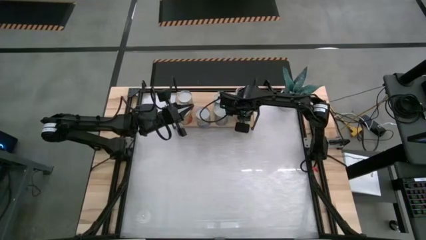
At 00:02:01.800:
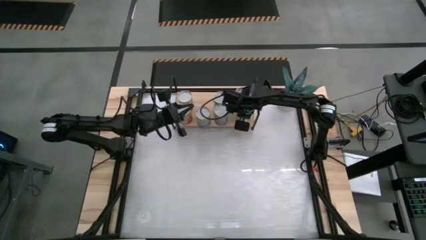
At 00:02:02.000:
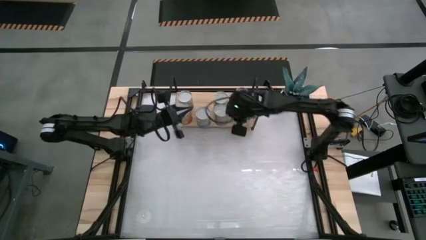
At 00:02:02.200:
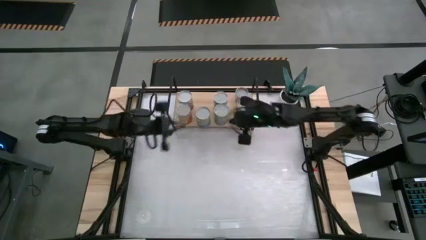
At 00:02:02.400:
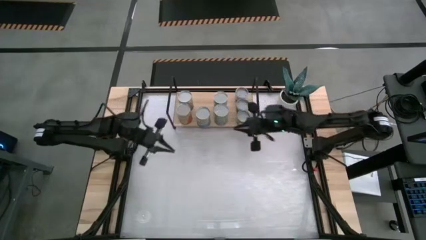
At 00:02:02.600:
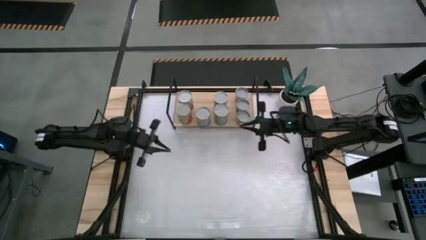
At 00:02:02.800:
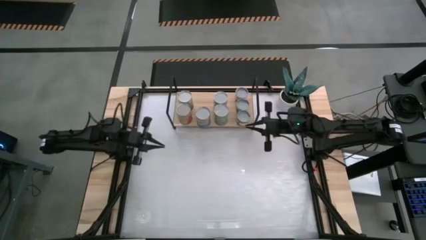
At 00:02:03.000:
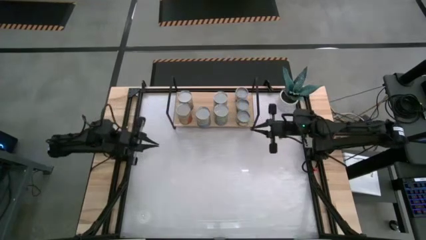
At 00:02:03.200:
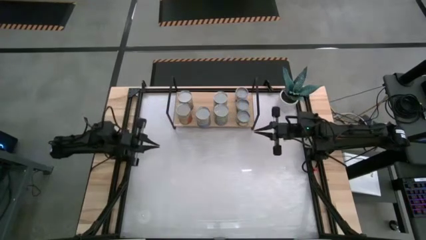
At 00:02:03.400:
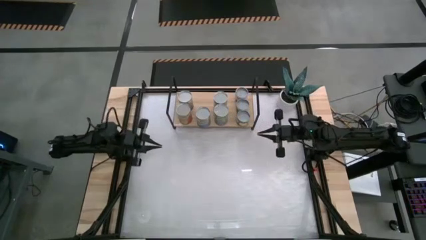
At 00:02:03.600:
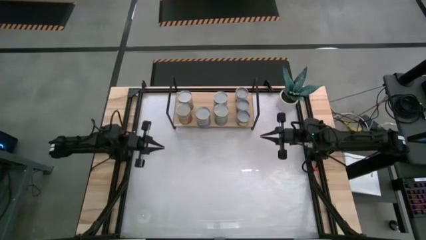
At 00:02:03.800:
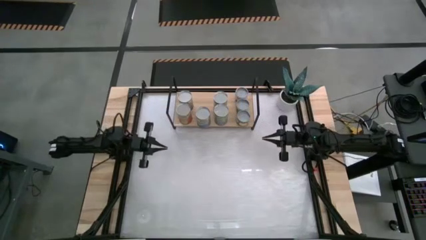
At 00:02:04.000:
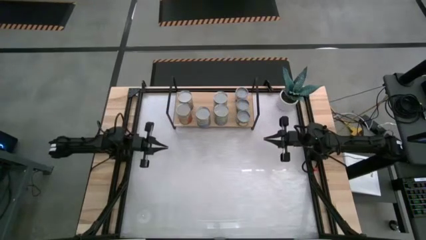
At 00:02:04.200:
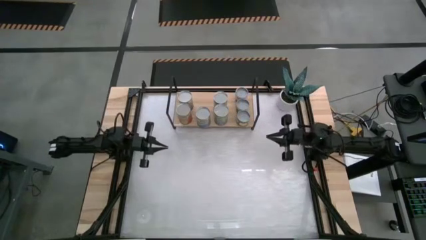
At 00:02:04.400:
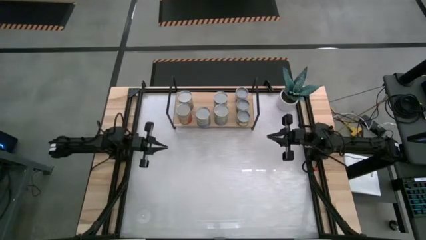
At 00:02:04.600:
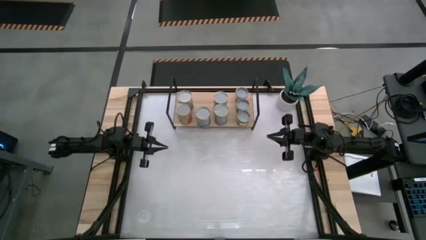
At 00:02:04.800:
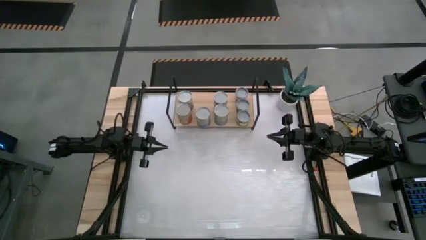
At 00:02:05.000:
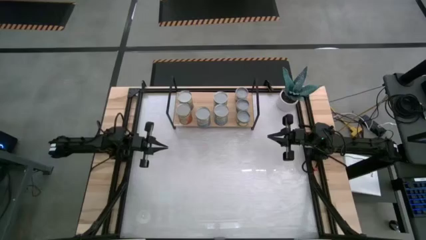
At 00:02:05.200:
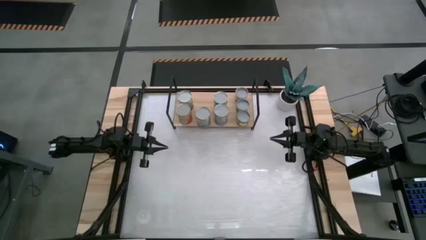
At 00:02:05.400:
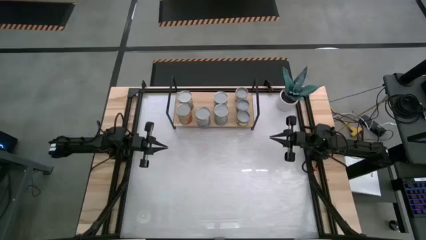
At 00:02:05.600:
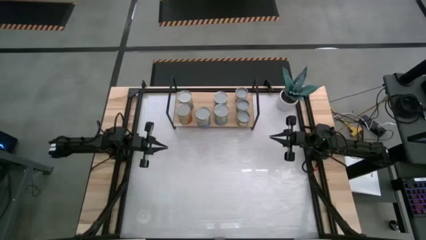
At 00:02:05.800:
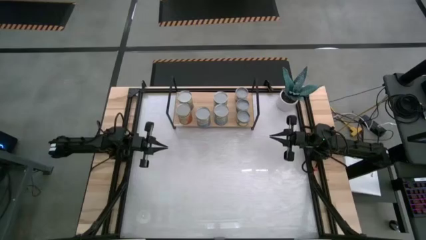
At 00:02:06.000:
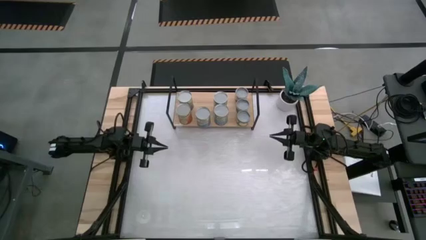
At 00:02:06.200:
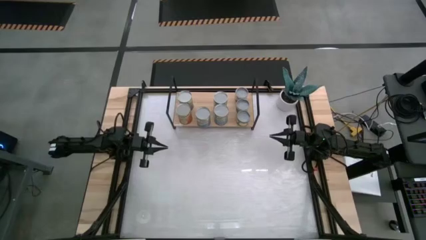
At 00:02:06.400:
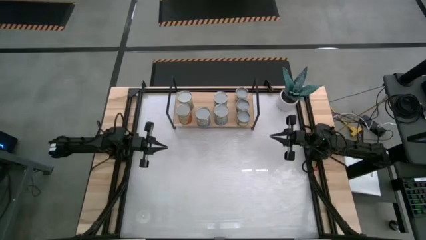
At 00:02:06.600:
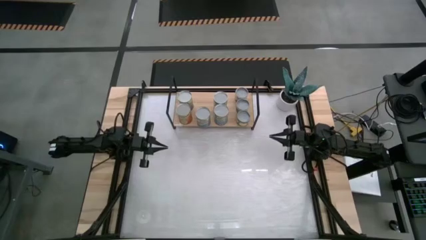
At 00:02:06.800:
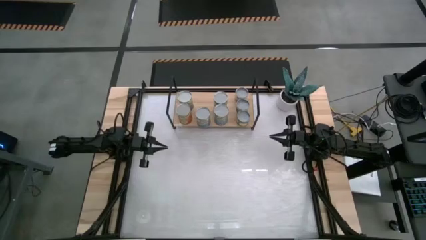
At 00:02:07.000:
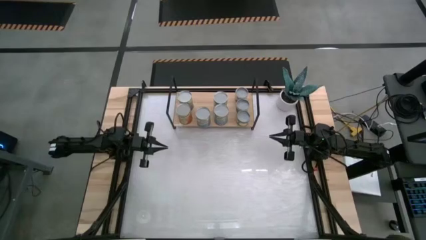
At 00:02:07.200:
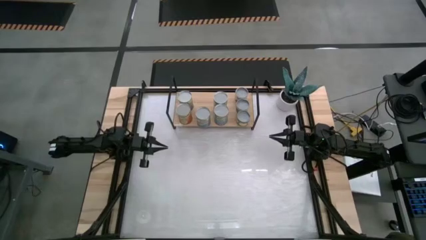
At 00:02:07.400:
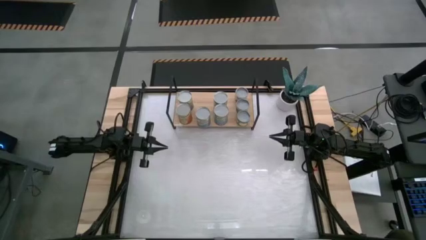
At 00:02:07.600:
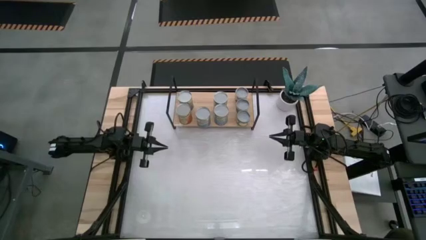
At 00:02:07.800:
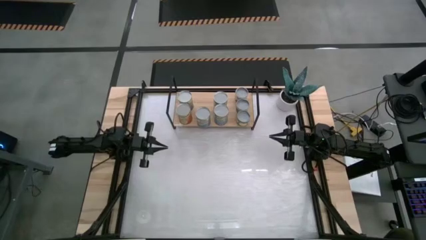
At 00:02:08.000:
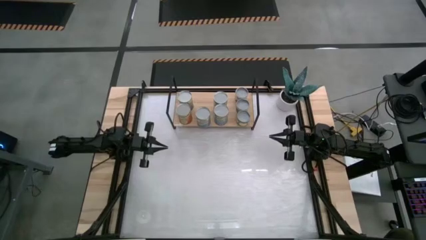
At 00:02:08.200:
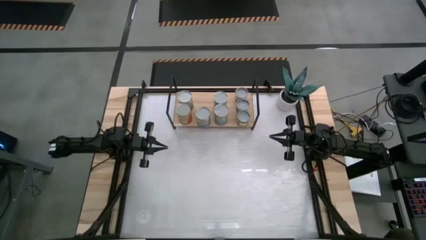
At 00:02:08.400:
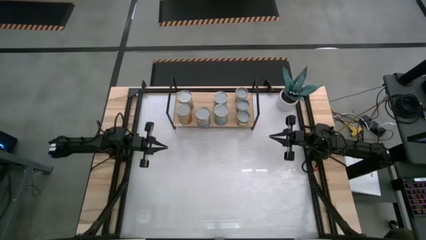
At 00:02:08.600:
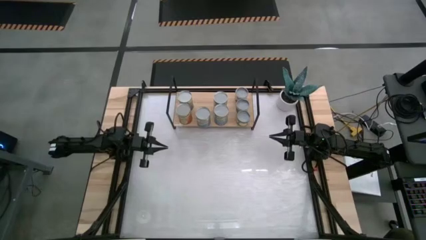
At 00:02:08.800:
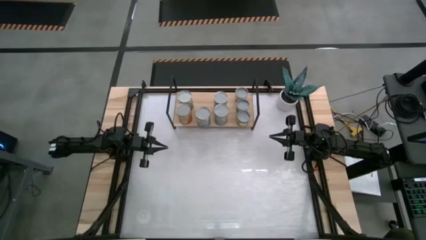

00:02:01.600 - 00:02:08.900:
Task: Pick and place cans onto a shelf
Return to home position

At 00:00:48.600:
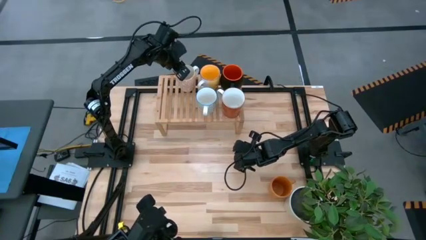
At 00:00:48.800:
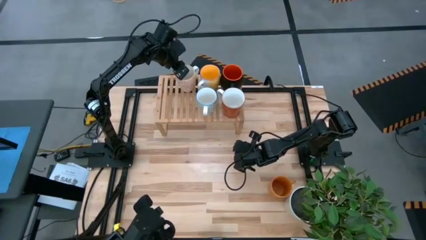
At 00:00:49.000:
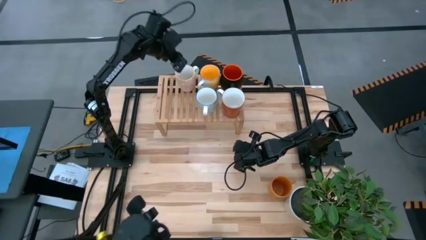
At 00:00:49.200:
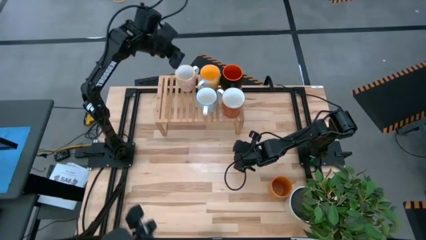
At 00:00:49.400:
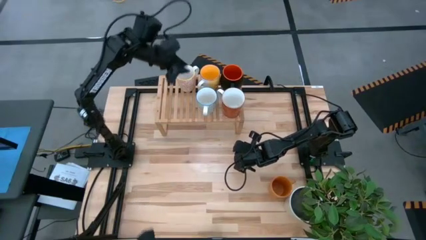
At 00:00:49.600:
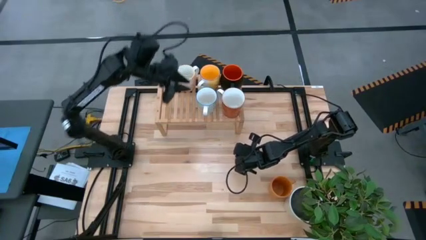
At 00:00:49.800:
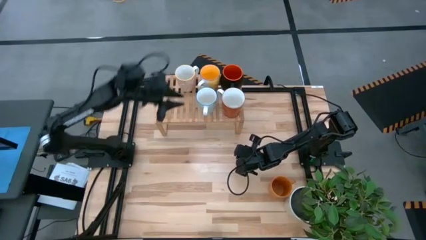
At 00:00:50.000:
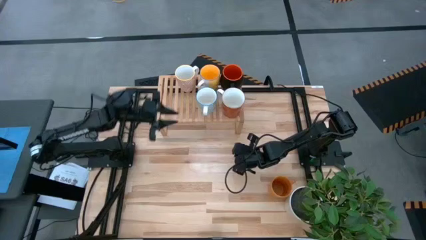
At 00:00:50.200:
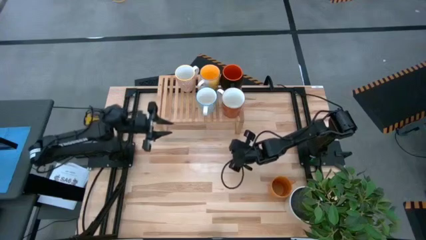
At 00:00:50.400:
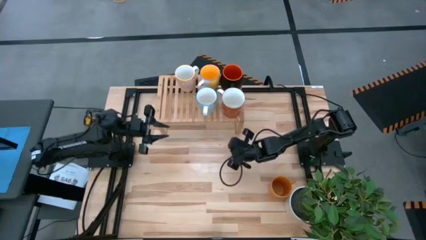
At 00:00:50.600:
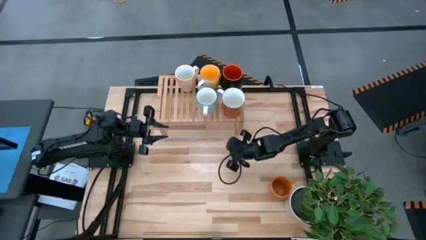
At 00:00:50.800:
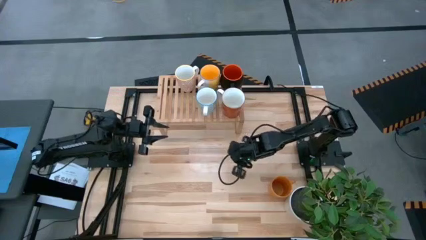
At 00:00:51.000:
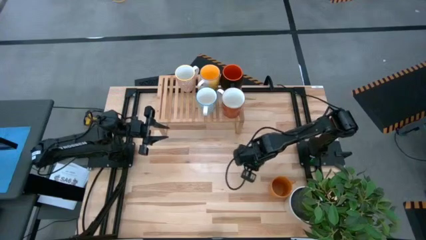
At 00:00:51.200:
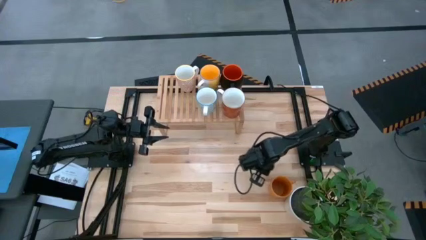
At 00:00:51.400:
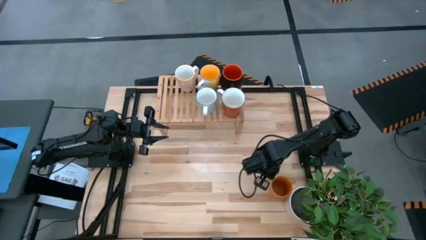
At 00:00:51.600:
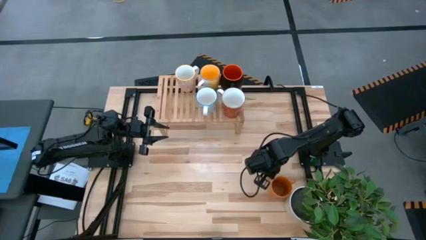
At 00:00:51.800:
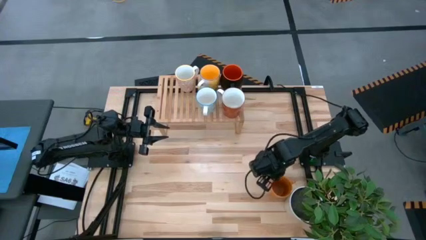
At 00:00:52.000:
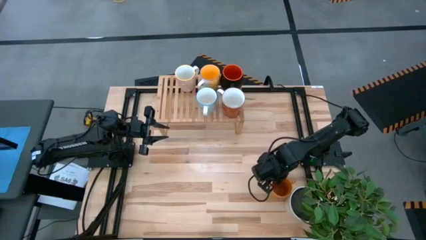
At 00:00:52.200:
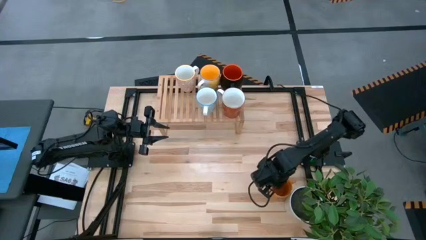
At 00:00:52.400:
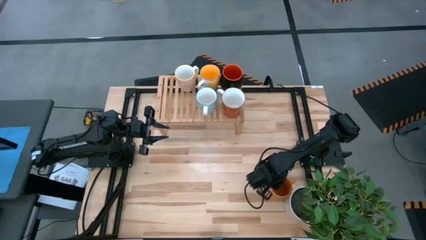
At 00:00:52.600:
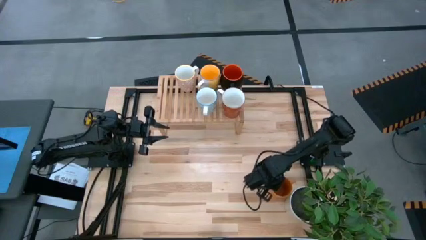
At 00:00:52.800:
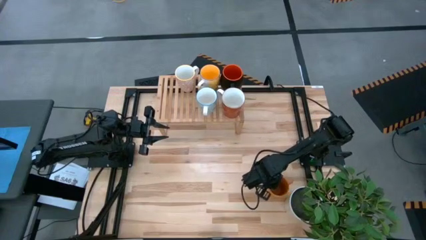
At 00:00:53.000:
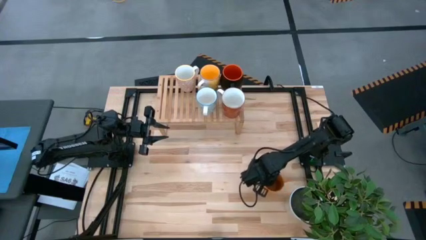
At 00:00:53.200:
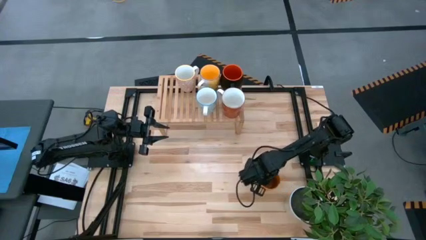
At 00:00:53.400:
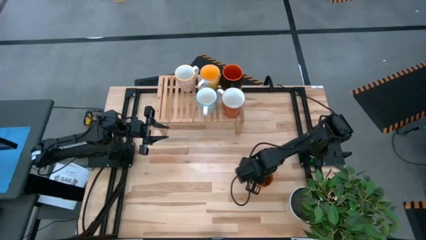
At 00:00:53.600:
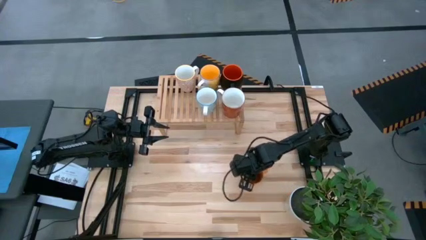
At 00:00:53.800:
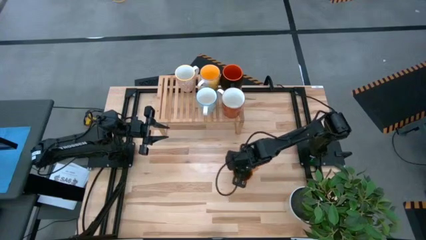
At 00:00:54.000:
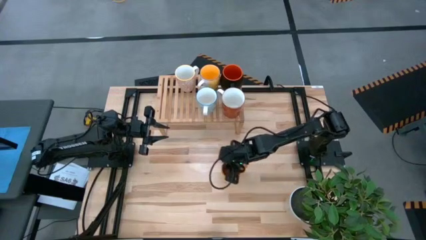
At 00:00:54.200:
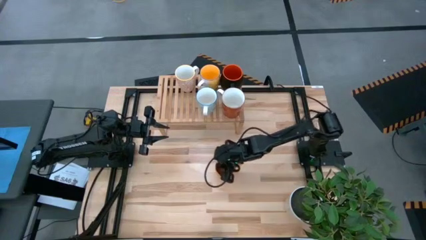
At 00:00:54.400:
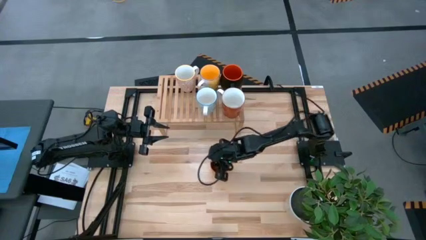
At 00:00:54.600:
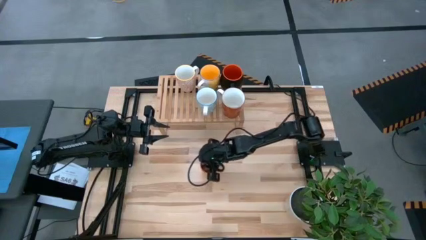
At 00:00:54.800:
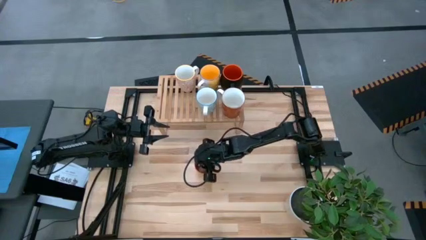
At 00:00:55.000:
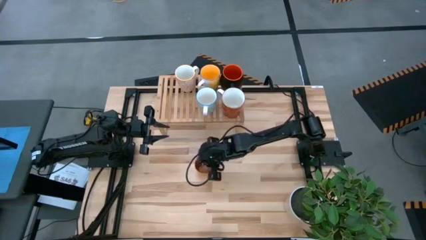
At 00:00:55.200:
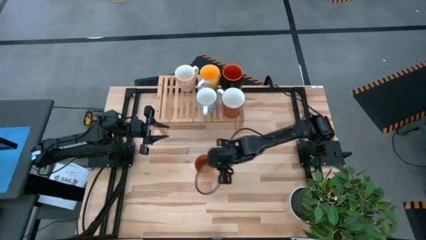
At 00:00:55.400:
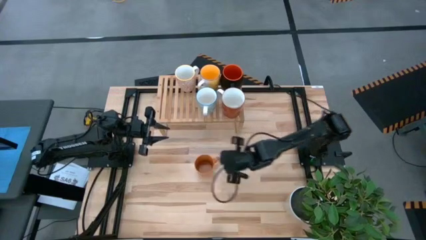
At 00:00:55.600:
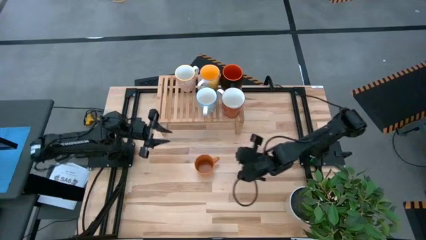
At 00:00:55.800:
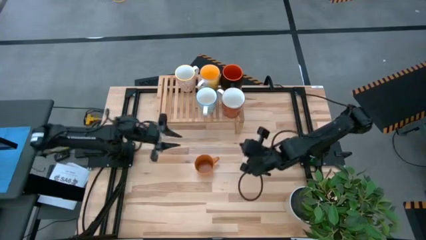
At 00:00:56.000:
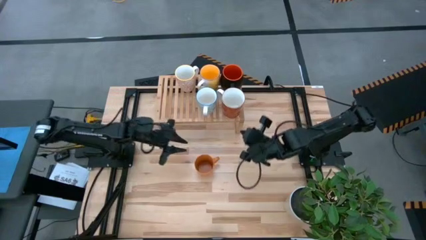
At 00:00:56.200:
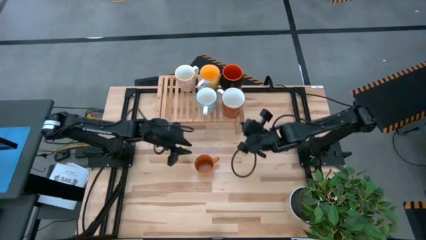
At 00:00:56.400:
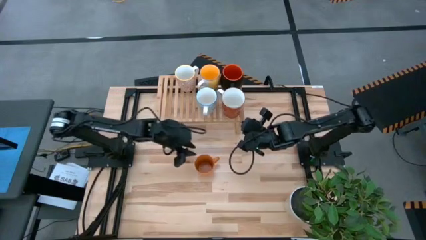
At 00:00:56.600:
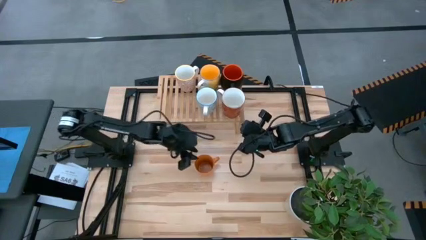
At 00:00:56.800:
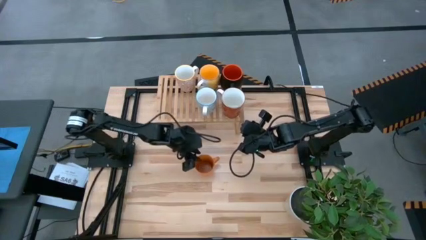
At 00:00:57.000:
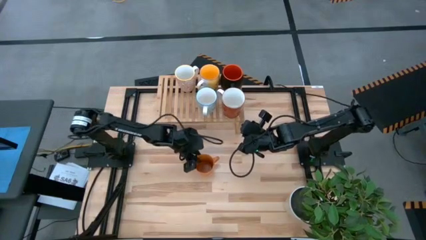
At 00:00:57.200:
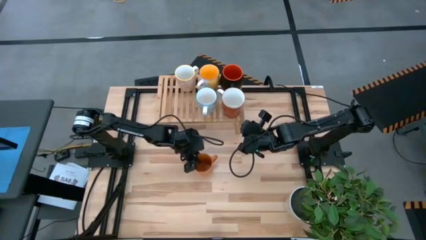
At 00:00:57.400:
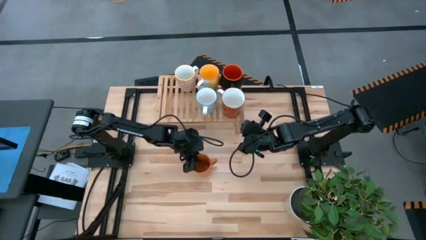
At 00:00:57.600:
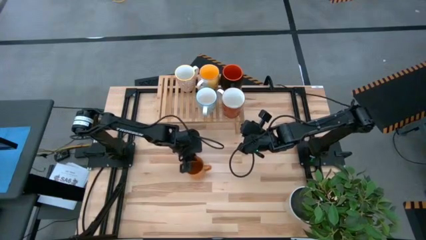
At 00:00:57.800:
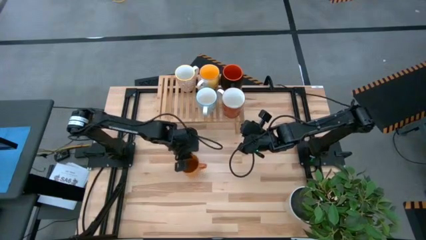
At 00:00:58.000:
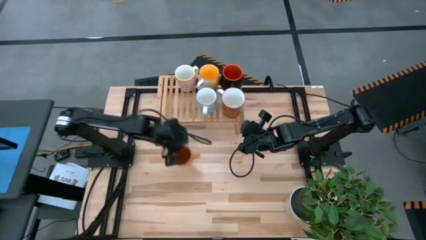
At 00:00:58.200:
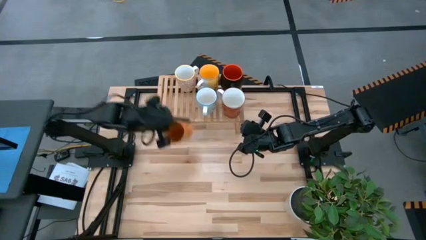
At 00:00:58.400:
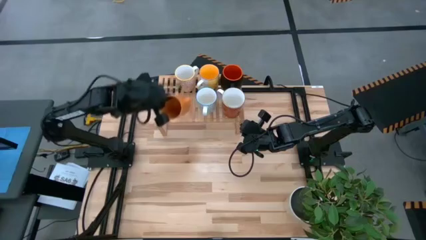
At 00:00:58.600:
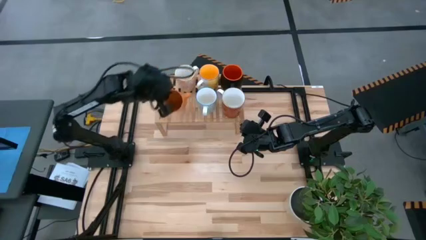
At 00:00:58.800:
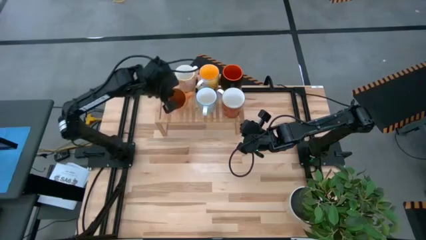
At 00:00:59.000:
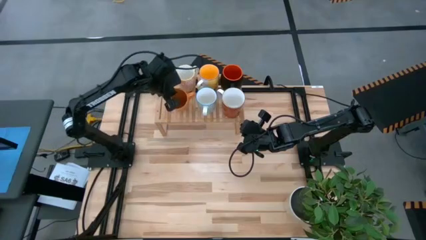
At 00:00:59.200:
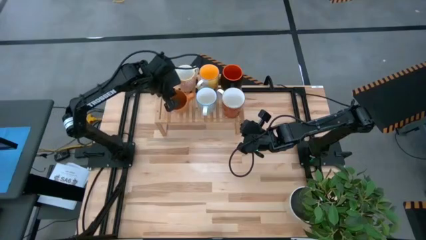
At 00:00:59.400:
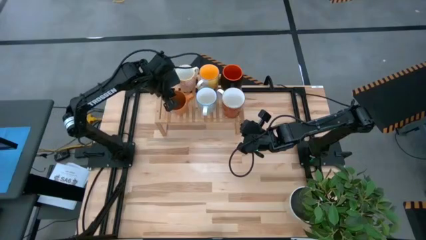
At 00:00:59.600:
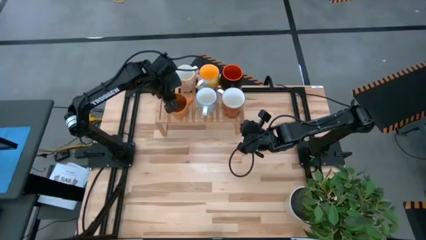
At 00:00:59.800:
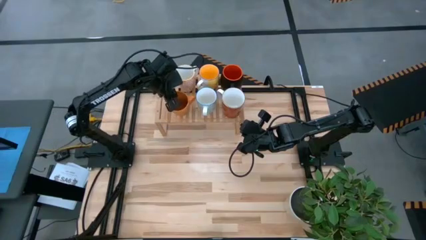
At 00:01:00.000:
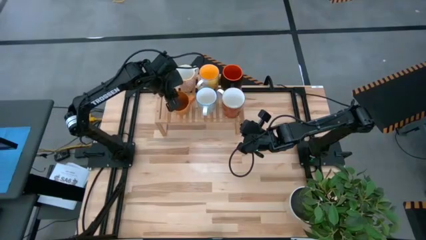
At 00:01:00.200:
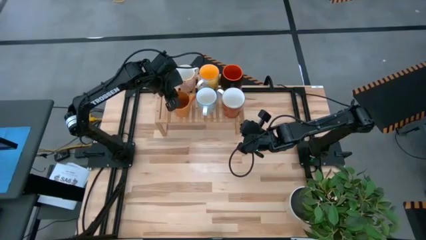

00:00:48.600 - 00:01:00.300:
Task: Place coffee mugs
Put the light orange mug on the shelf
